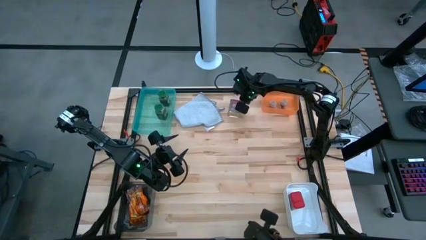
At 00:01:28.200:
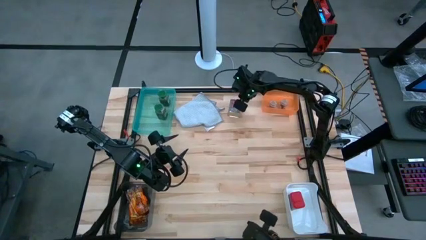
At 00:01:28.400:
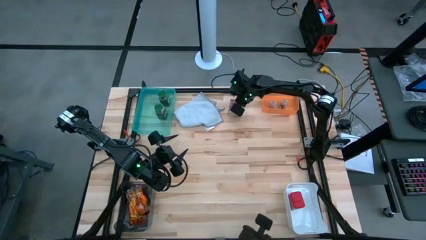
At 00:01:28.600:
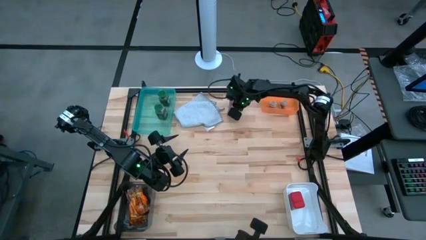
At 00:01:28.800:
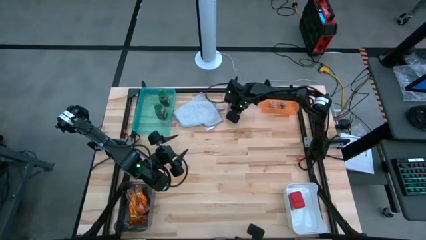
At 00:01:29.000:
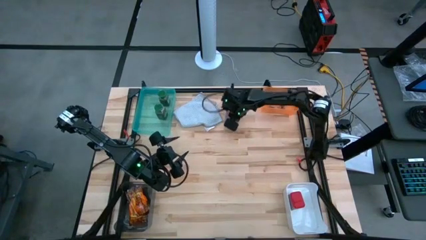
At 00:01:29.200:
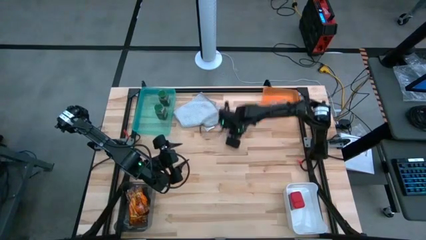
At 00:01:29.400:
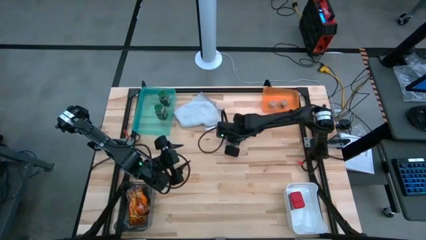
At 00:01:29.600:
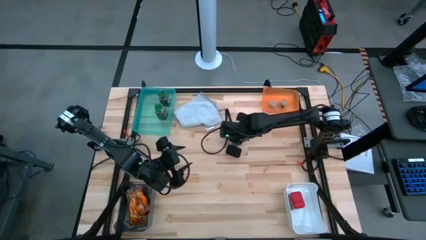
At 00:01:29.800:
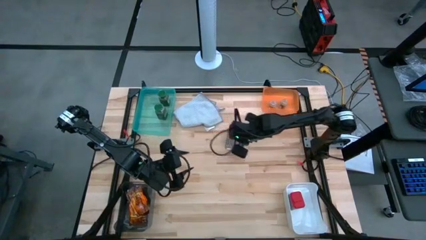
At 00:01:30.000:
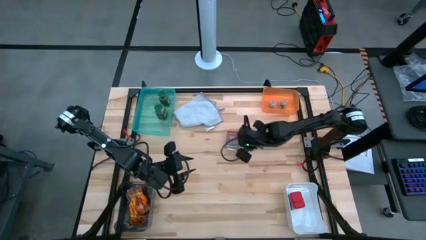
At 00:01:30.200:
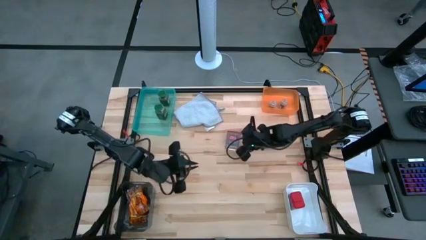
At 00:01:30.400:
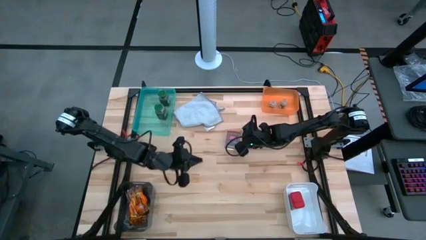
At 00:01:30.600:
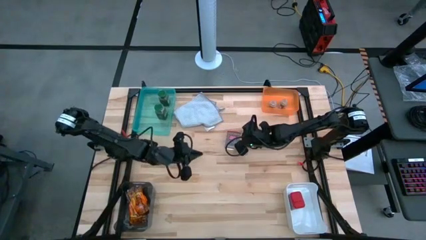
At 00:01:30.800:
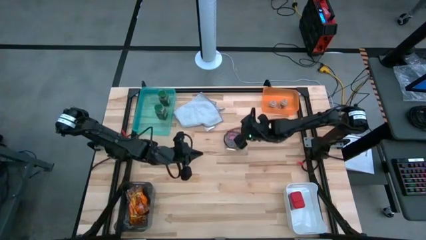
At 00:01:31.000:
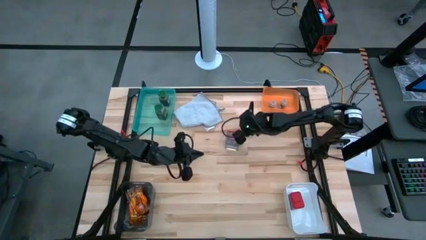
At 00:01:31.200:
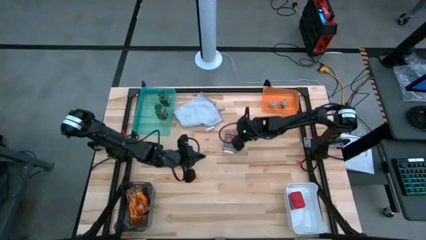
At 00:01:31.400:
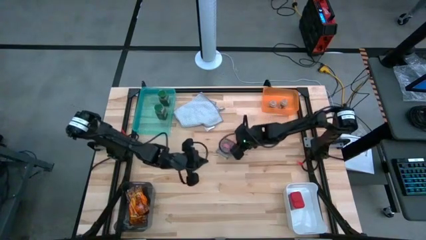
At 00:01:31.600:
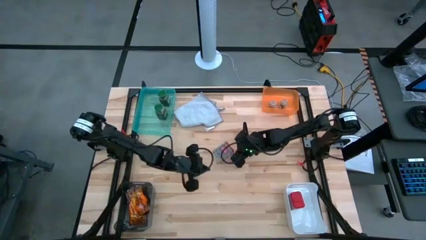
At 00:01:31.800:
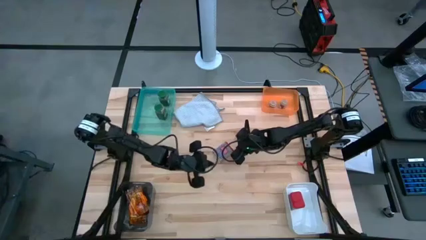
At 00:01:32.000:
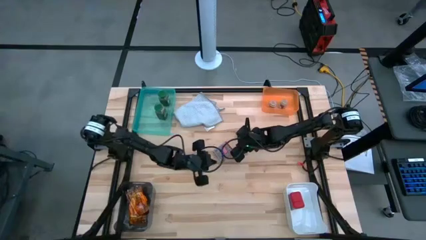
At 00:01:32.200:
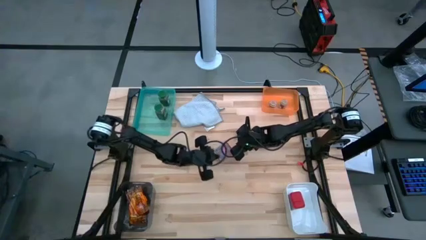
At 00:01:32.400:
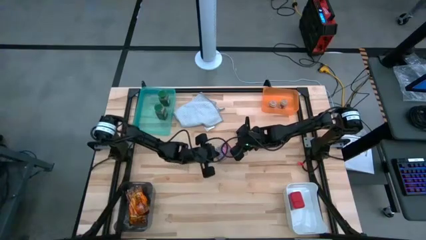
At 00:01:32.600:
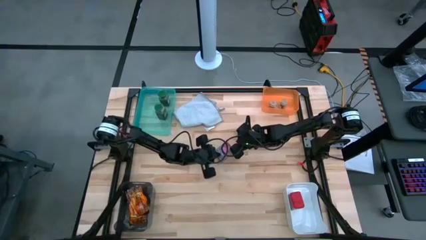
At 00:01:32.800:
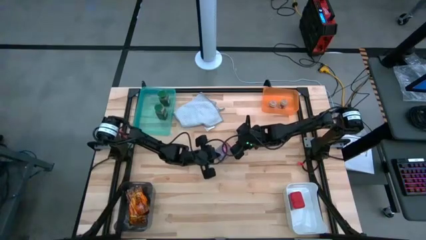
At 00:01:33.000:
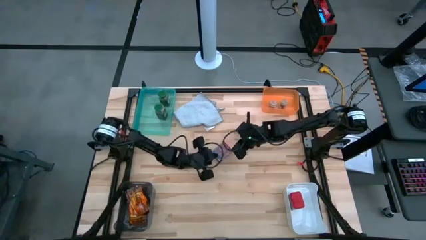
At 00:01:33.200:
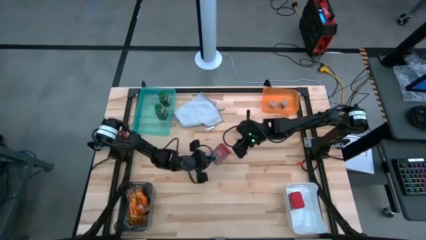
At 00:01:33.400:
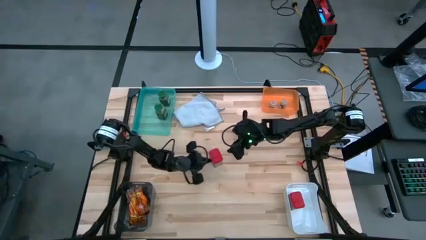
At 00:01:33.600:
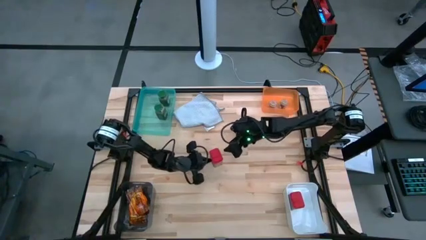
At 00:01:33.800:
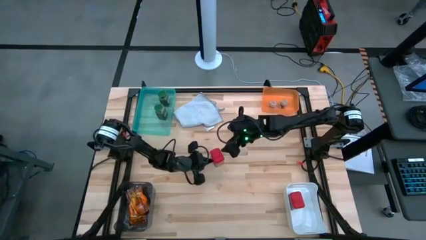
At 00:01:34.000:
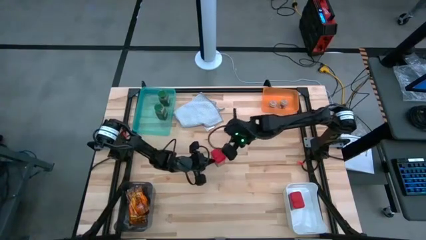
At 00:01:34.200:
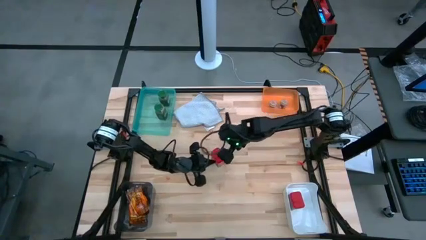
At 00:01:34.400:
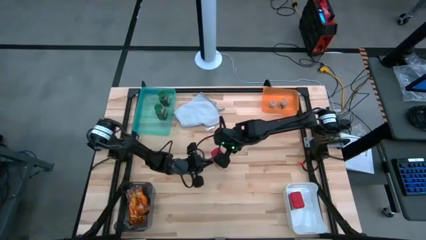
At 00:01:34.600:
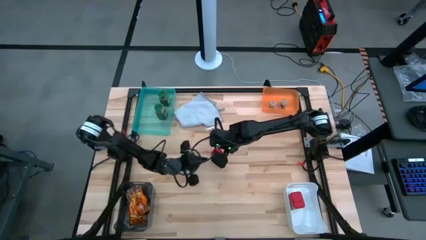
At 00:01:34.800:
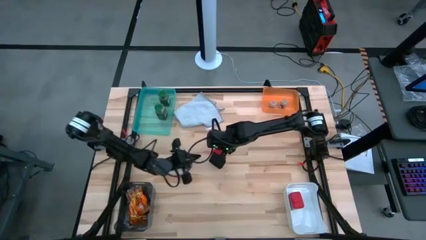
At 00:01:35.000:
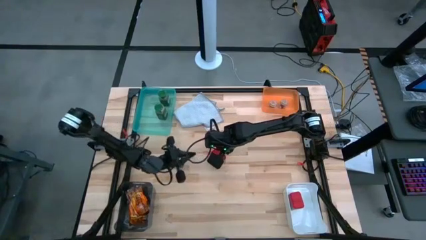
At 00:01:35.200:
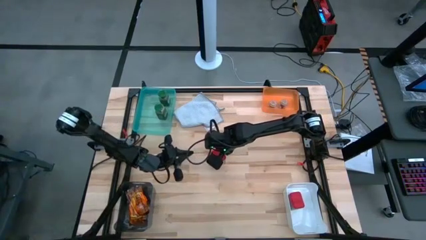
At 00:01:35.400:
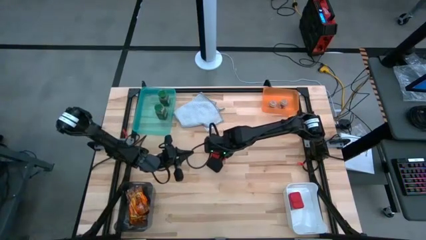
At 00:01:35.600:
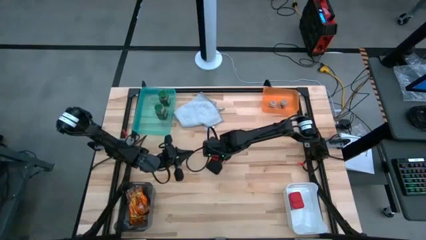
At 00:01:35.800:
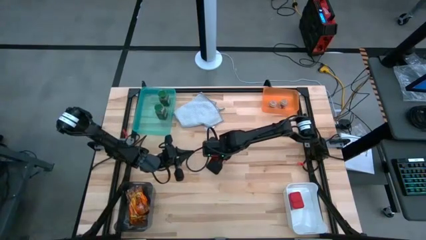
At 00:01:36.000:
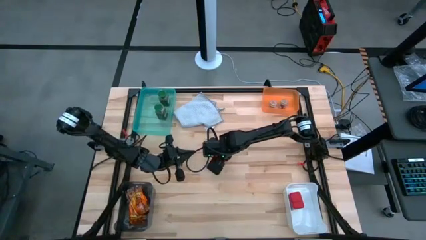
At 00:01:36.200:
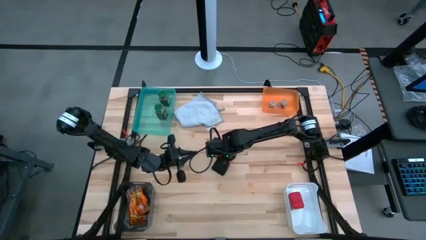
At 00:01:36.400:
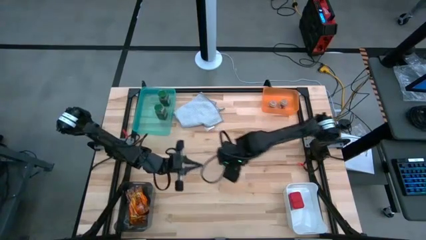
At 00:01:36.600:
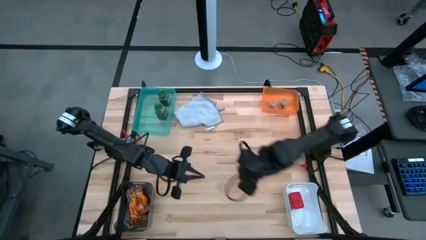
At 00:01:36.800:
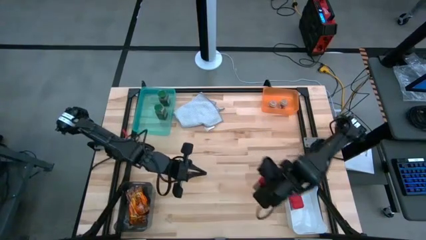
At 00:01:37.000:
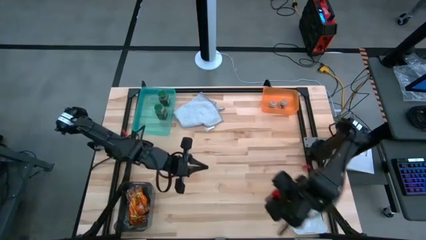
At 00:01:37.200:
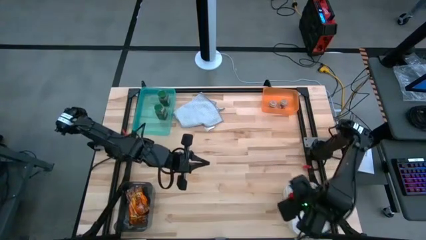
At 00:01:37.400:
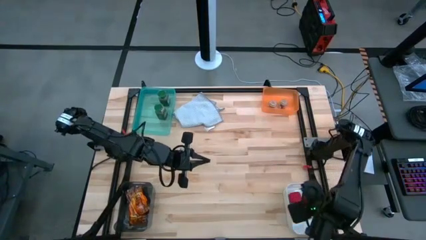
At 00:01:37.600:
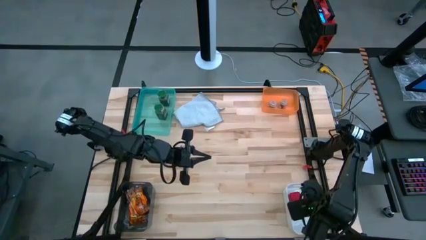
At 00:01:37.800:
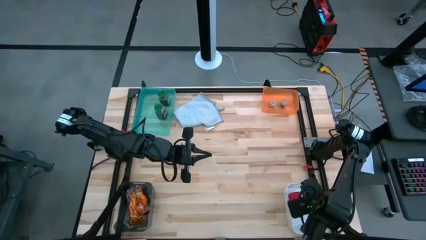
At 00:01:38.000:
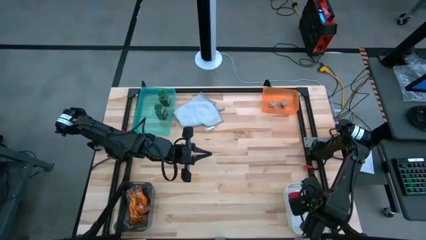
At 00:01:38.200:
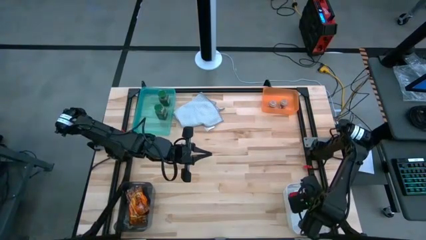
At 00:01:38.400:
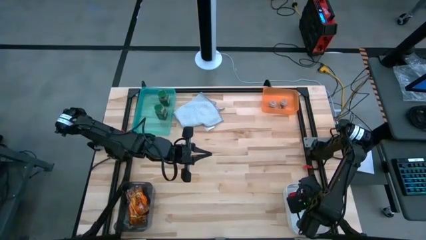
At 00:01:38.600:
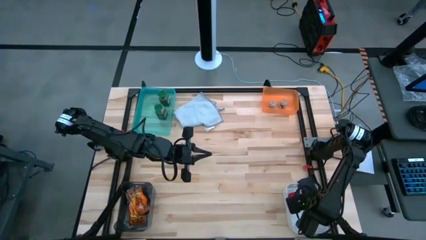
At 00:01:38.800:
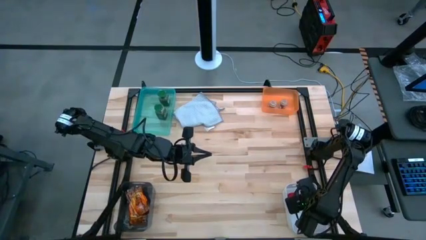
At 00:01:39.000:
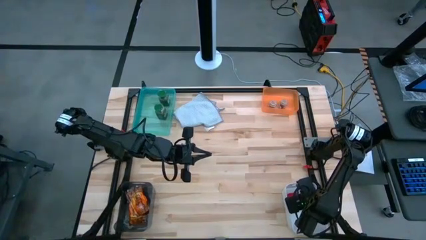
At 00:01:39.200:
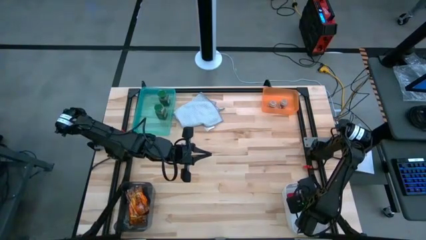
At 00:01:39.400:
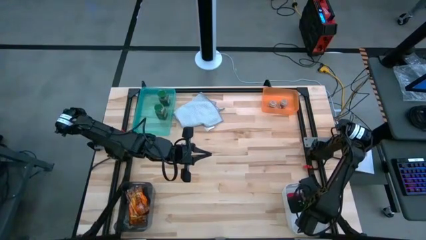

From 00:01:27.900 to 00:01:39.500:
Task: Sort spices by type
Put the red seasoning can into the white bin
